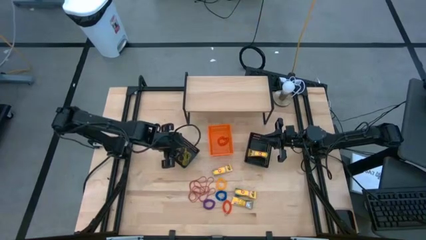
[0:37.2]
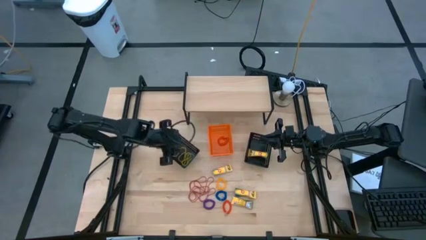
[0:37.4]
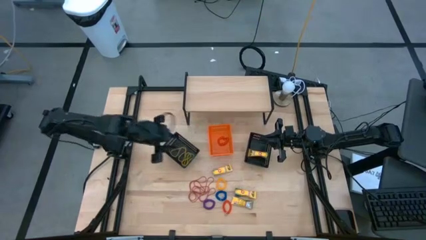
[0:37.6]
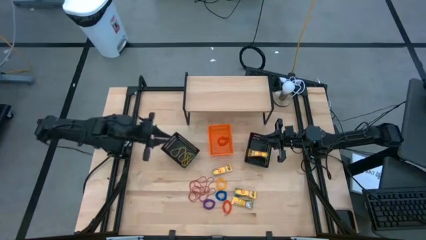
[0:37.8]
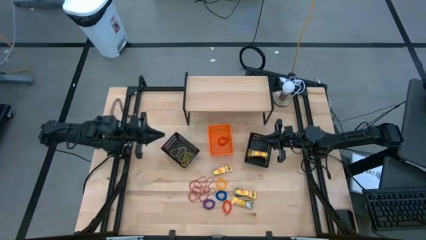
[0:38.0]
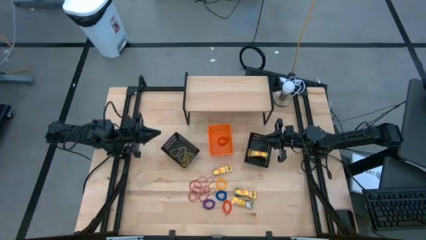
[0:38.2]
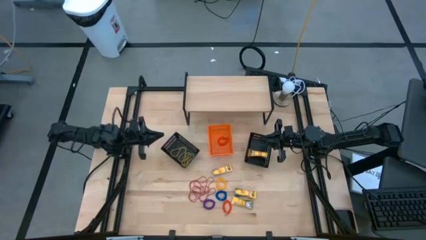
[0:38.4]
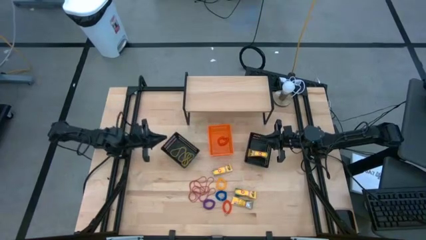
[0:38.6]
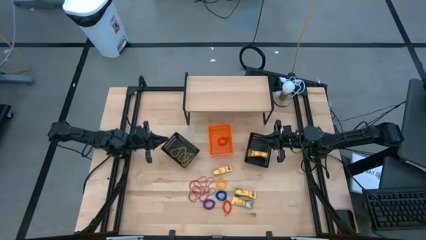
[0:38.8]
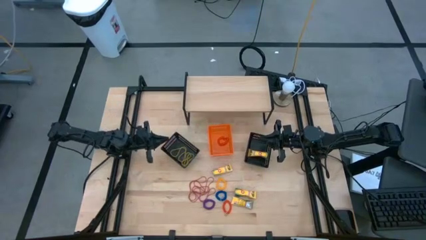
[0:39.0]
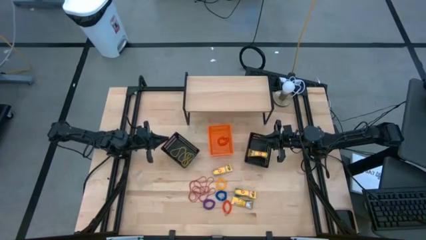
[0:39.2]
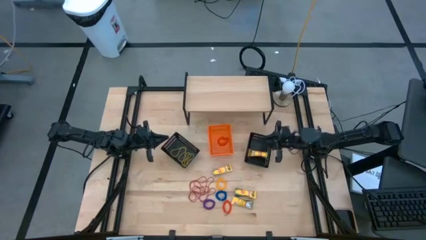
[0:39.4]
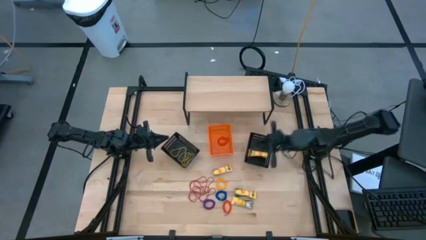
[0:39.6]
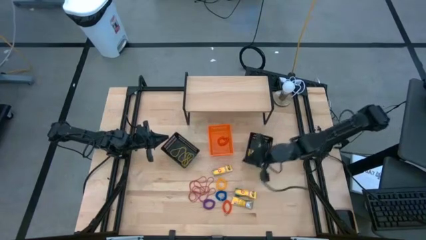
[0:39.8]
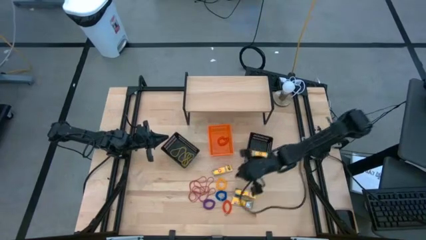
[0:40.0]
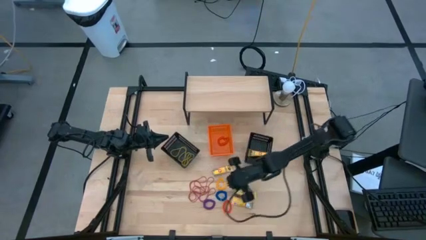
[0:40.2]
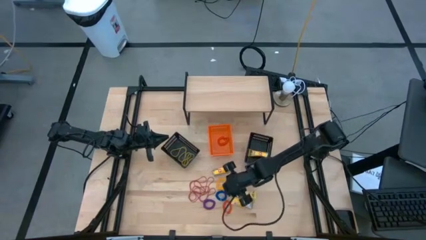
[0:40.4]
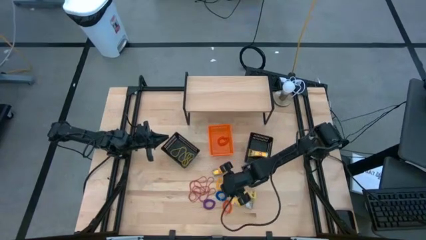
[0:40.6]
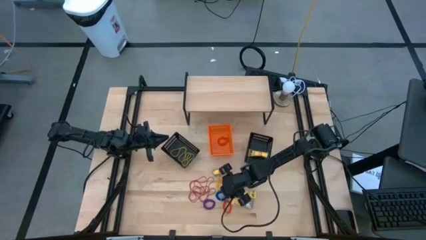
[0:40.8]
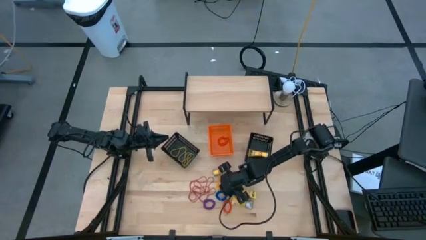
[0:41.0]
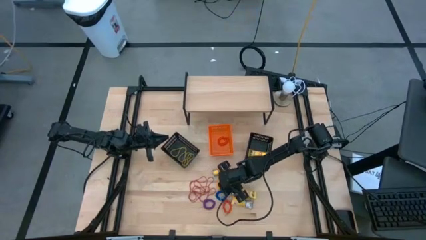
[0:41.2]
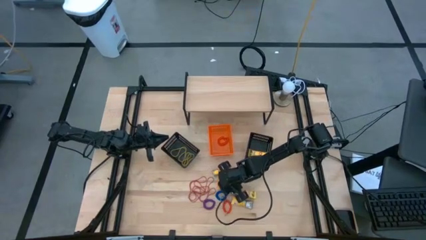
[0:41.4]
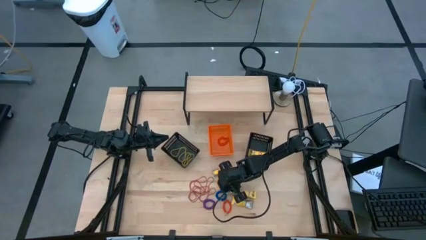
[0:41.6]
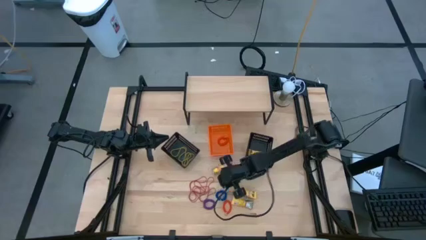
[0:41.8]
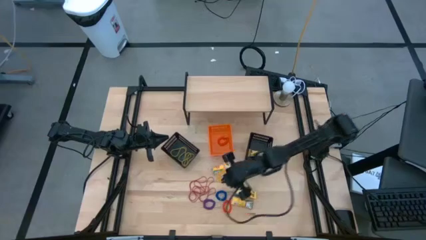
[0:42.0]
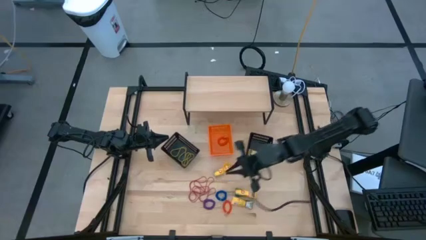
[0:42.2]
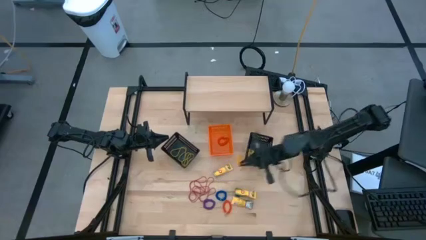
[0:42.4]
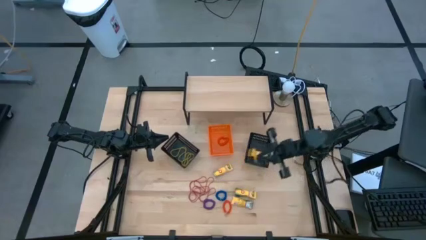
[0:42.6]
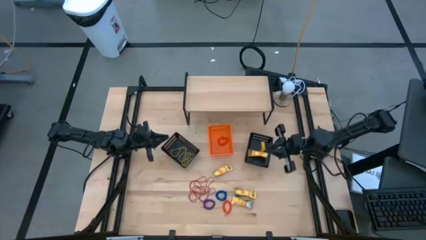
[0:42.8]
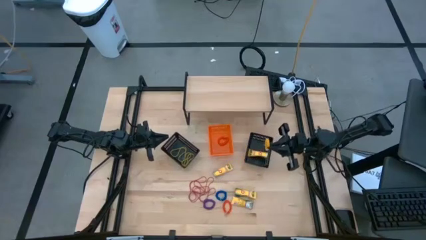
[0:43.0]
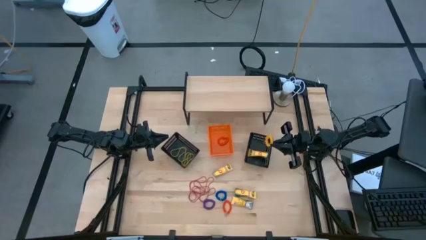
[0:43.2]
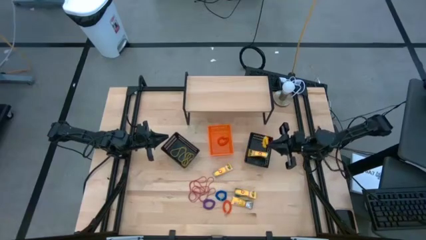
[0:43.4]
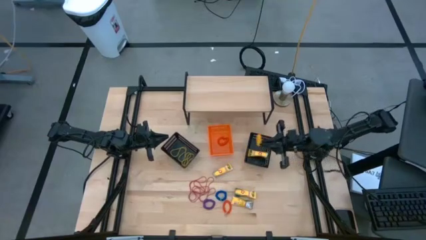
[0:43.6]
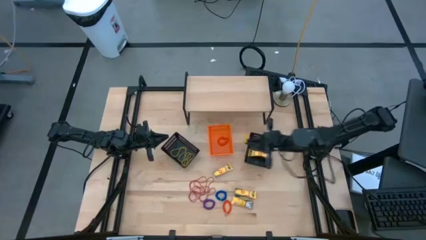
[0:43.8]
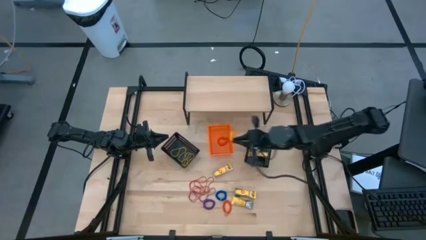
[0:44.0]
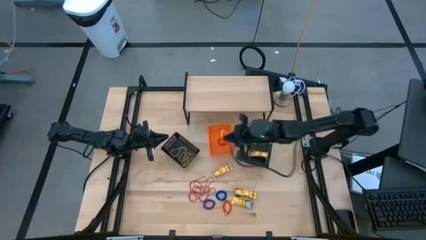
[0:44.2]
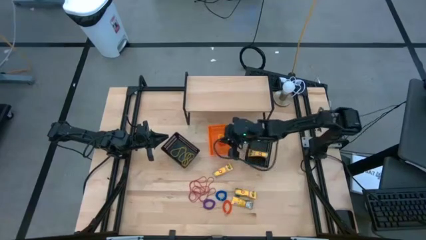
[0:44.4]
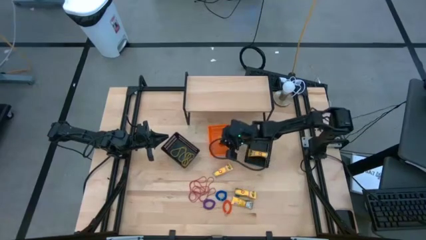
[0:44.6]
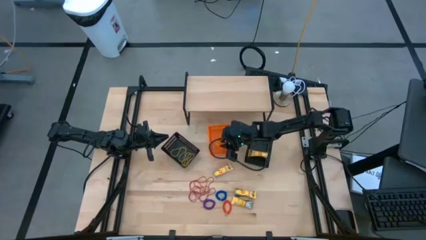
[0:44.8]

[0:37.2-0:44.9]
Task: Pick & Place Office Desk Supplies
Put the yellow keychain into the orange bin

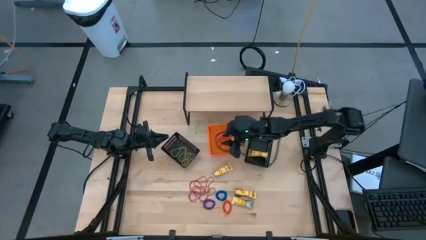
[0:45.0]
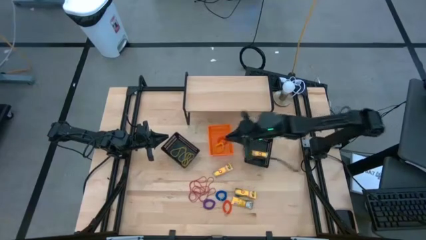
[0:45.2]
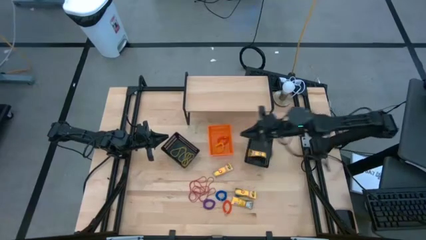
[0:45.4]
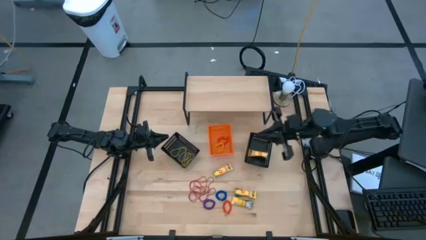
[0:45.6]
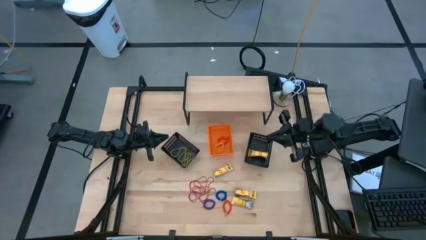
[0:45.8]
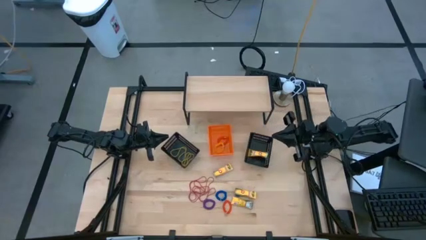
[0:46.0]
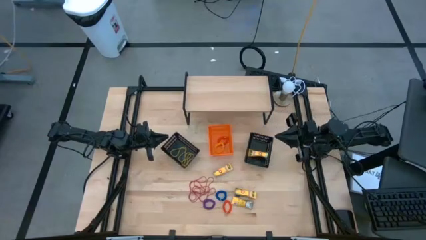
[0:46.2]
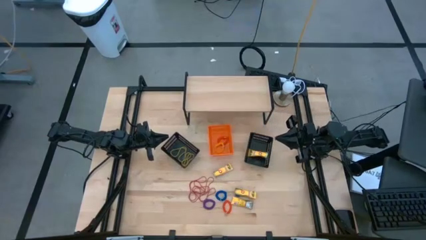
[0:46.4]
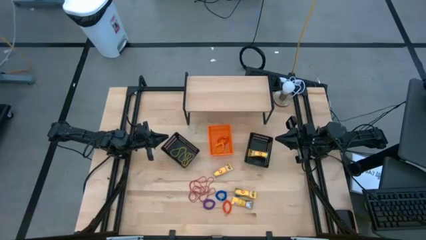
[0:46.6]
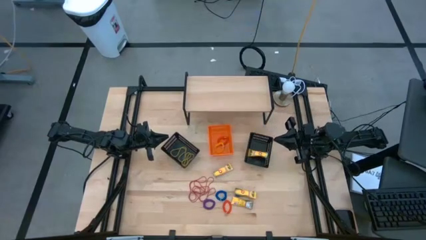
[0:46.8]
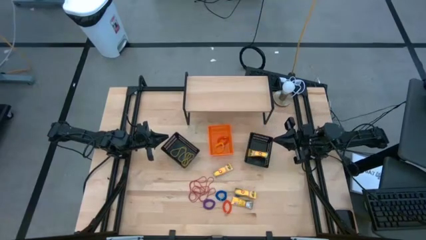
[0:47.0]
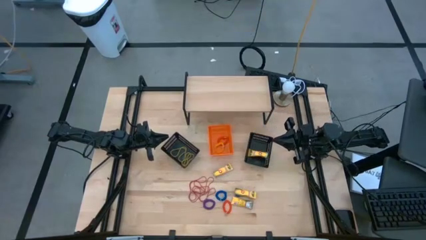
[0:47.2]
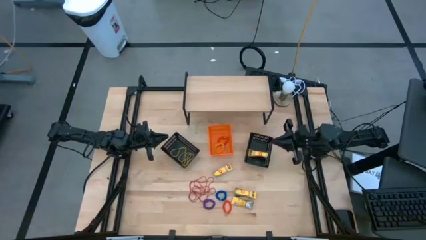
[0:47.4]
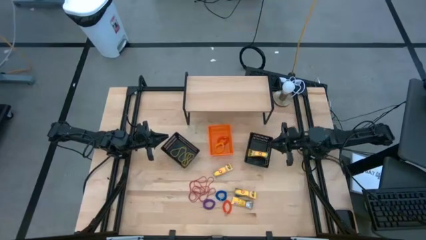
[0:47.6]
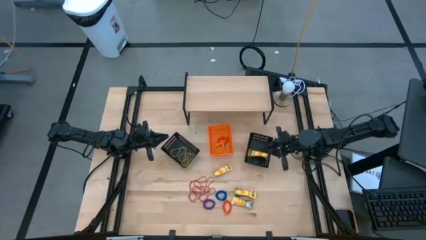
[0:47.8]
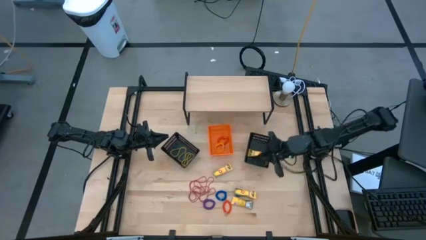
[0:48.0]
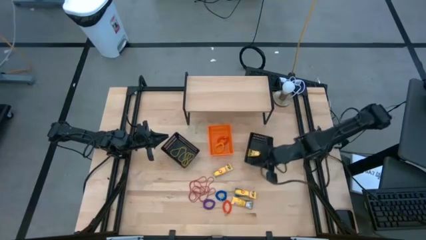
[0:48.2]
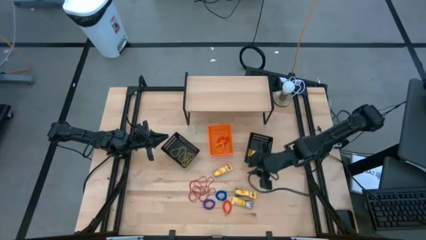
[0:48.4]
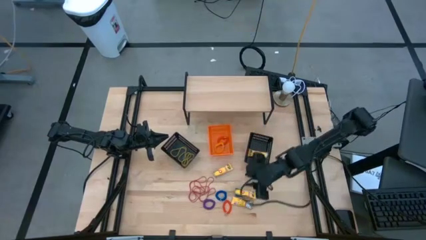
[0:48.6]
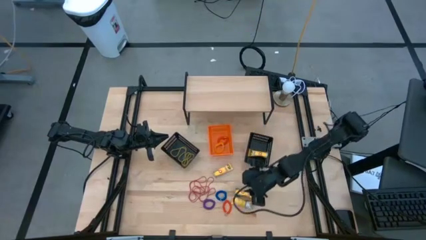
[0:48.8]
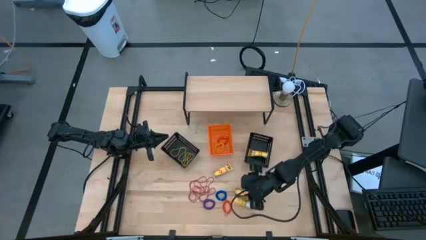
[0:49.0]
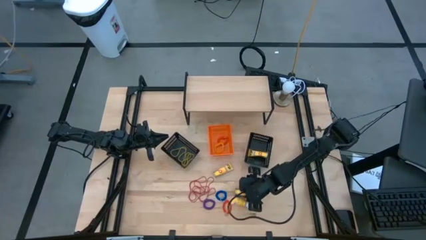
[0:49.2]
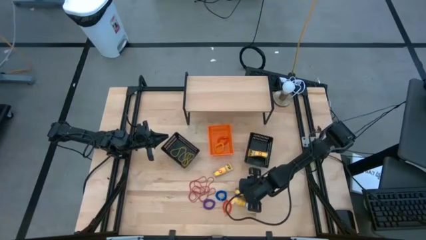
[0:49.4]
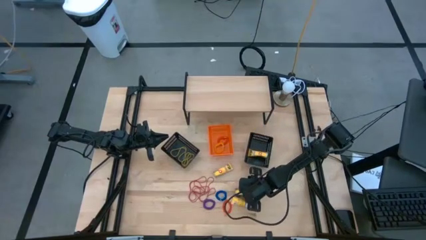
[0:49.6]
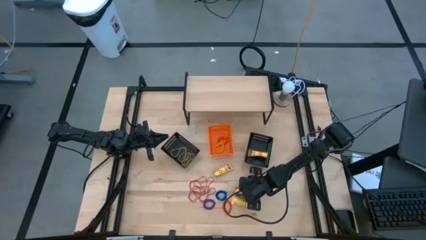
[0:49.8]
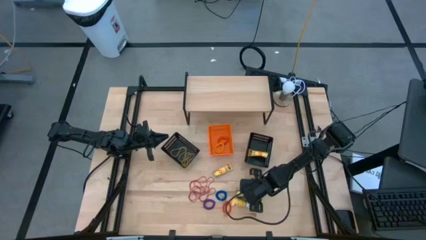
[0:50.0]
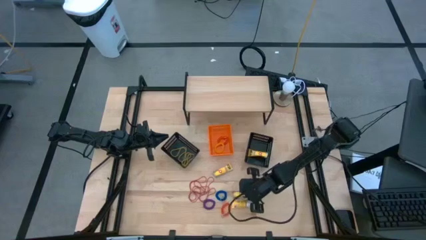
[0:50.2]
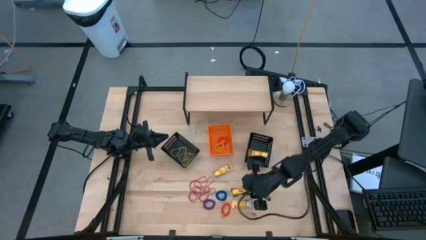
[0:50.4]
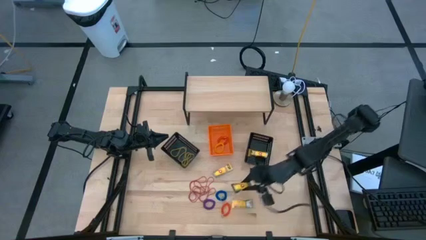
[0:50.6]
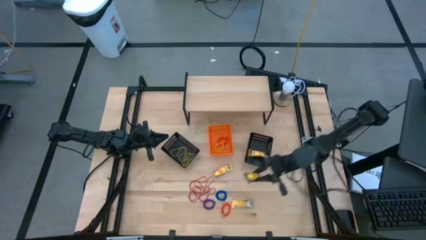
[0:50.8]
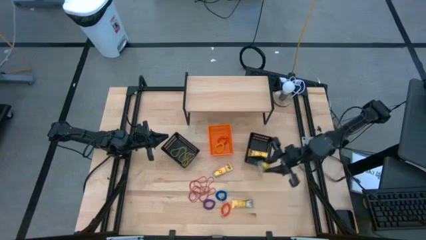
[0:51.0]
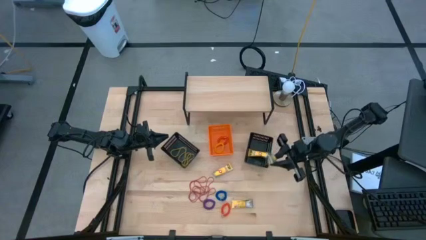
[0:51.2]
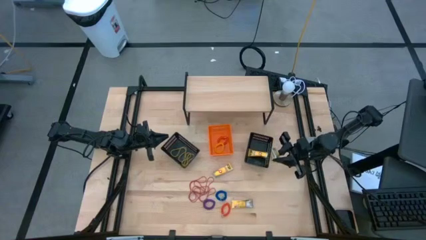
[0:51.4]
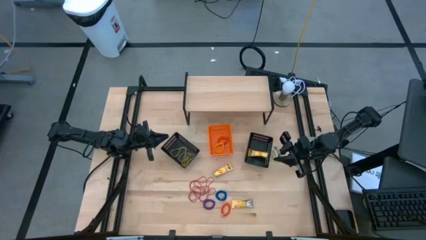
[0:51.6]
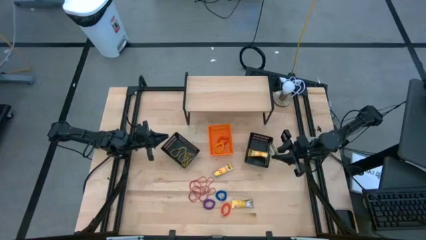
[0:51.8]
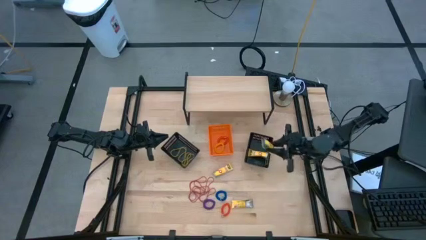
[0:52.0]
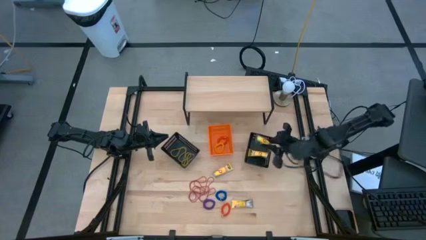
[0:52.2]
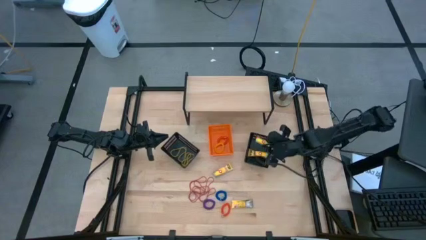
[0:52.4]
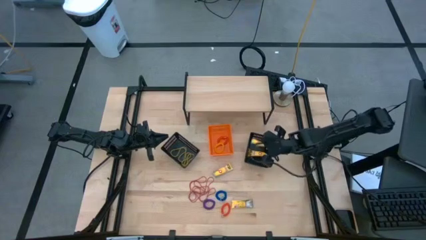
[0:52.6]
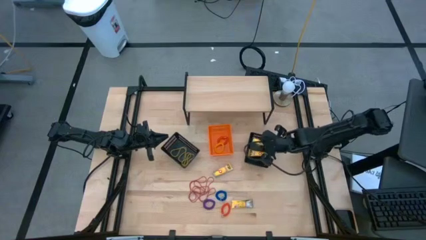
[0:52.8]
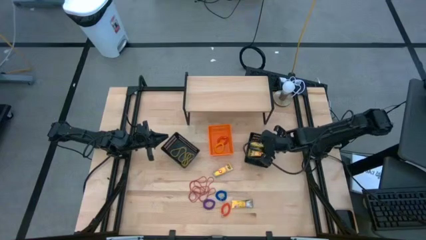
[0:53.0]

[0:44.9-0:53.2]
Put the yellow pack of crayons into the right black bin
